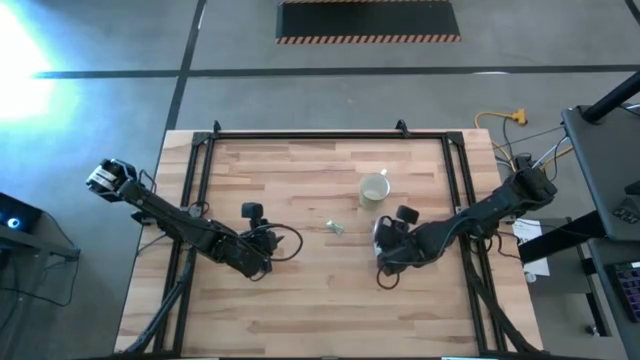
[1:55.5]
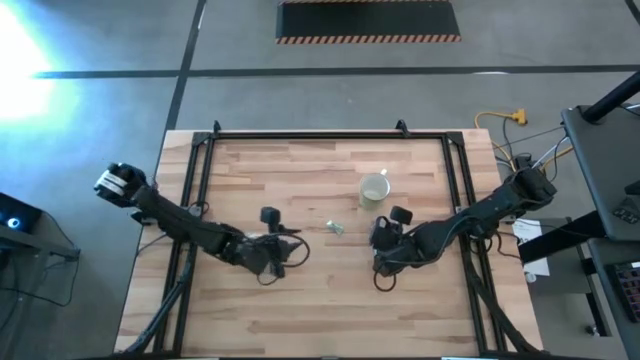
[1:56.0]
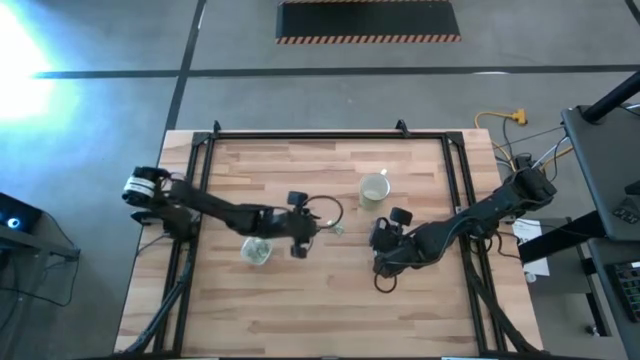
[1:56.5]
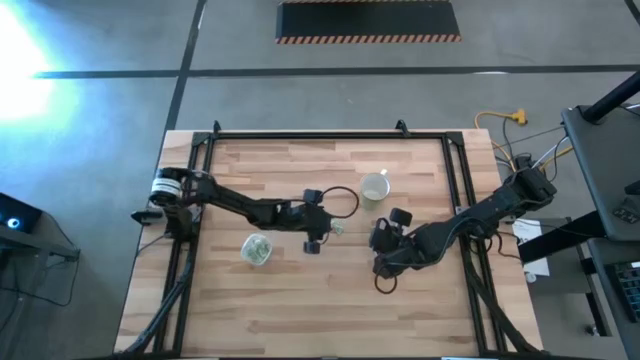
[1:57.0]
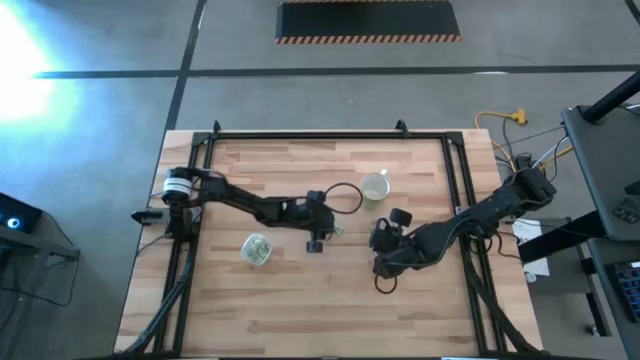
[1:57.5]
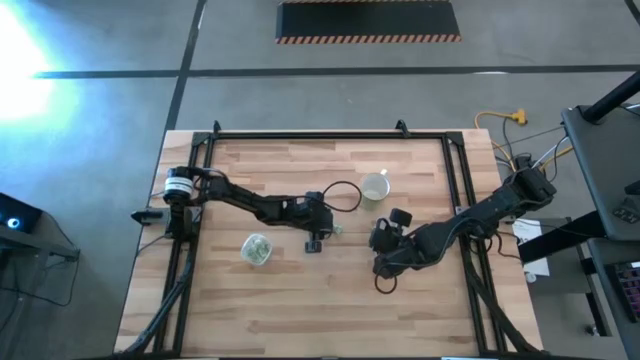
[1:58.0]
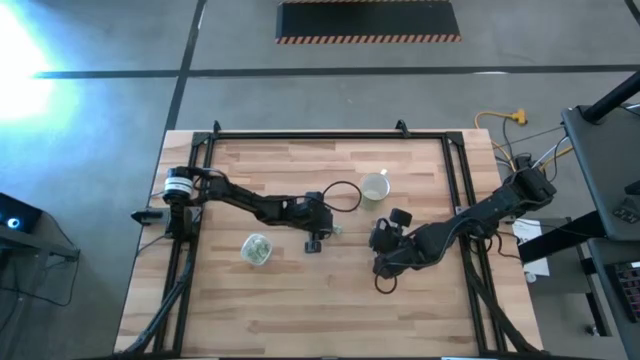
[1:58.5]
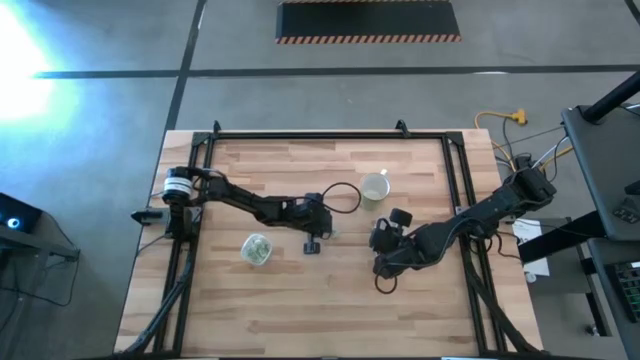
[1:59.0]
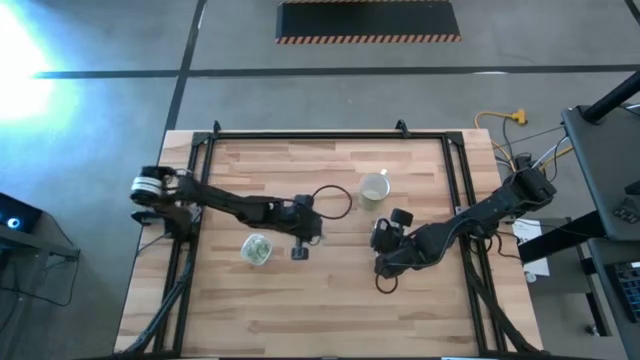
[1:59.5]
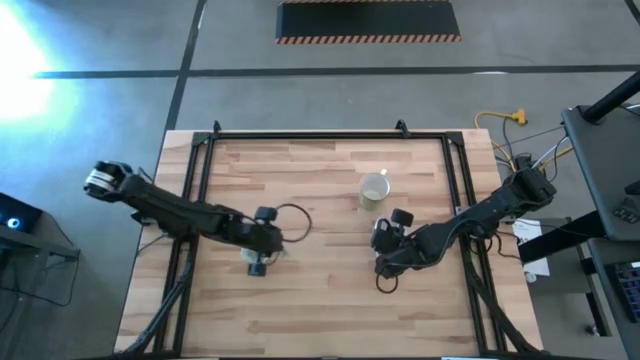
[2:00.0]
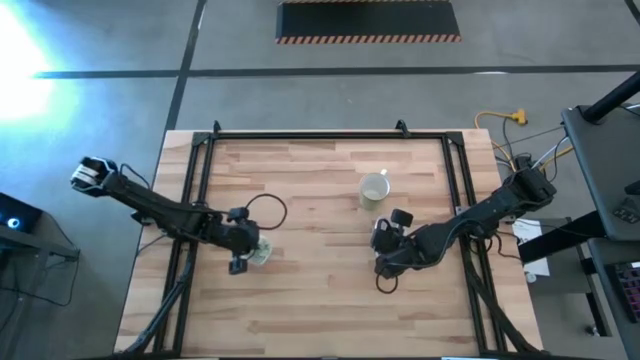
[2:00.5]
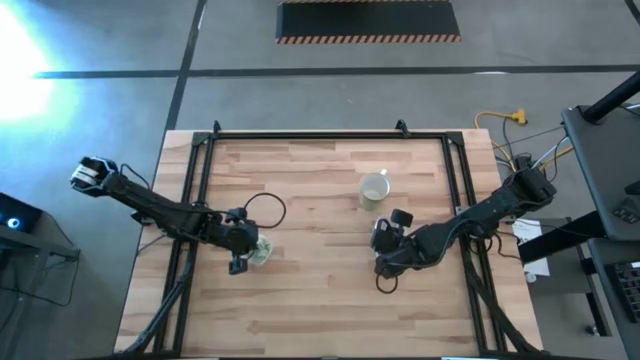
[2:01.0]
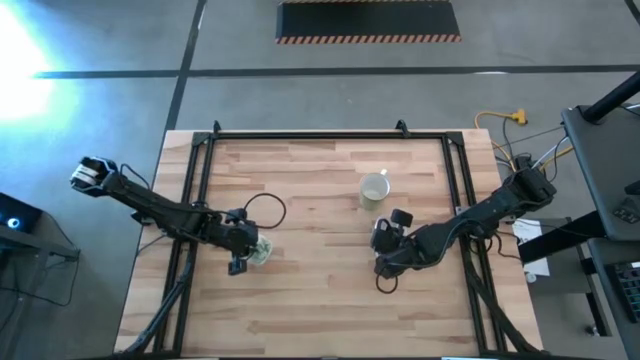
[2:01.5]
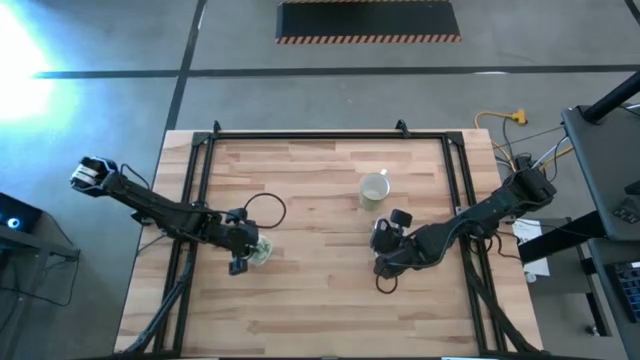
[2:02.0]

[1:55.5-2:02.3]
Task: Pick and place Stevia / Truvia into bins
Put the stevia packet into the left transparent container

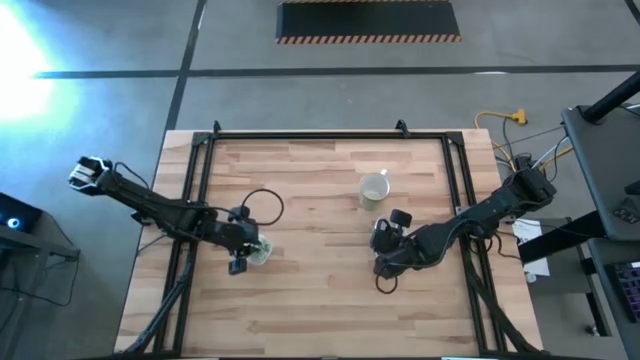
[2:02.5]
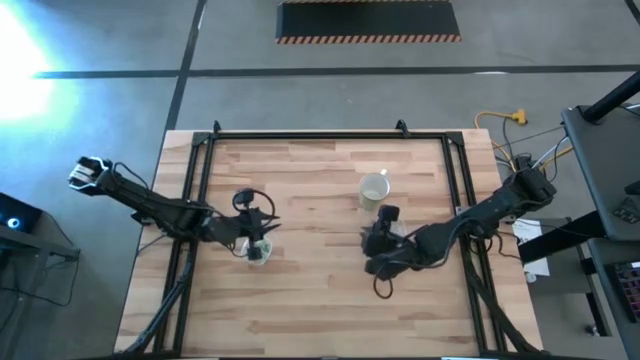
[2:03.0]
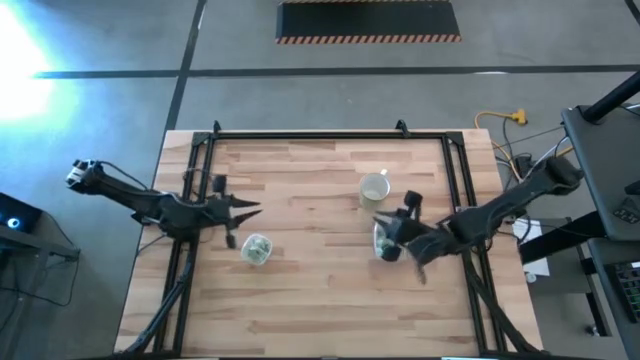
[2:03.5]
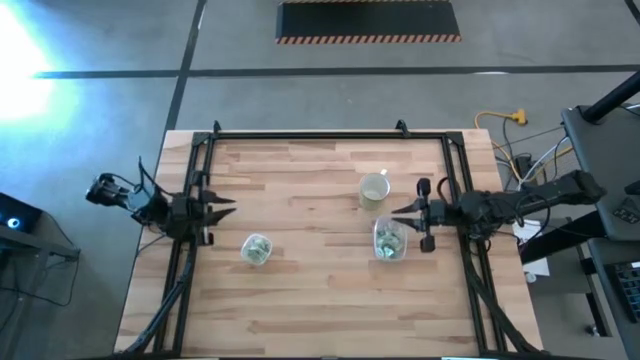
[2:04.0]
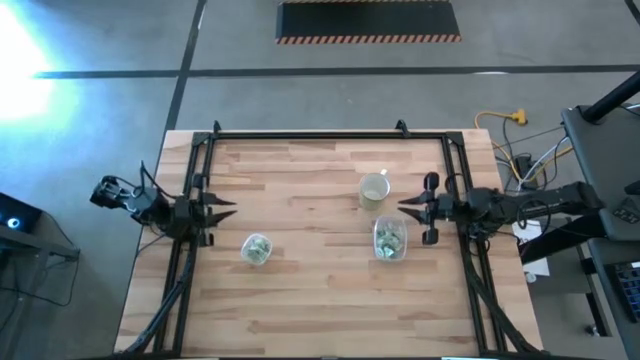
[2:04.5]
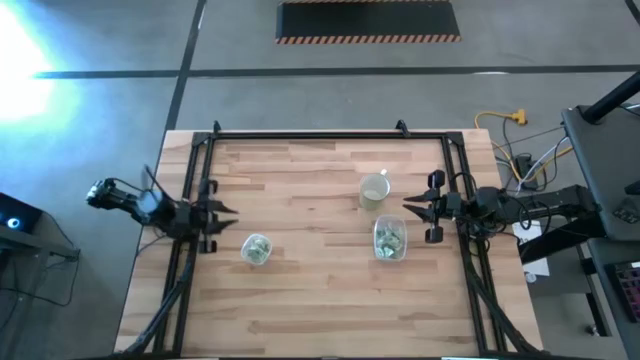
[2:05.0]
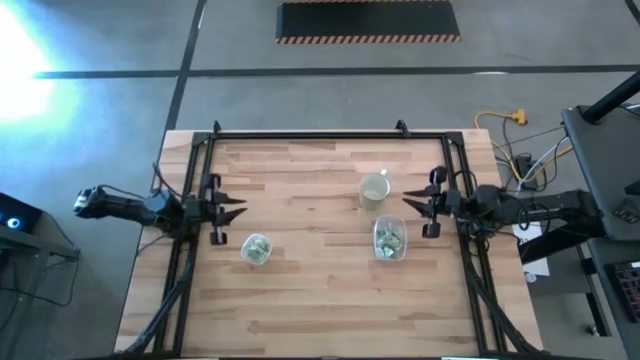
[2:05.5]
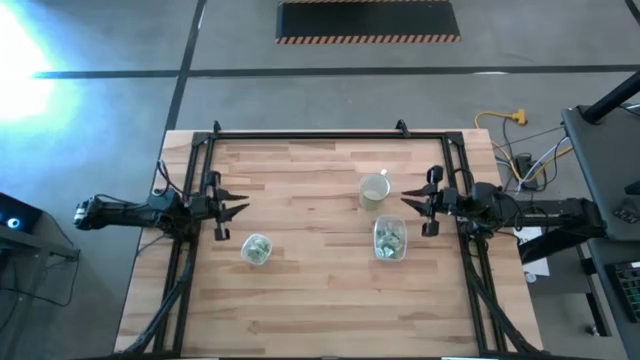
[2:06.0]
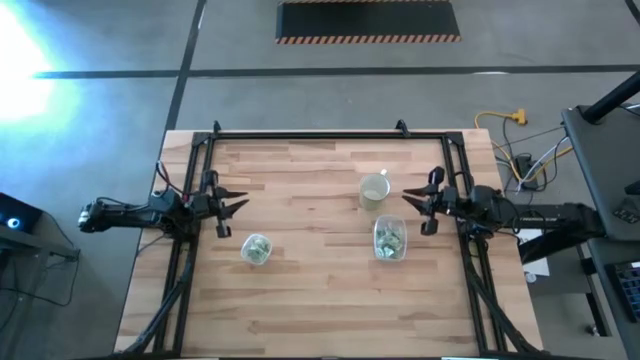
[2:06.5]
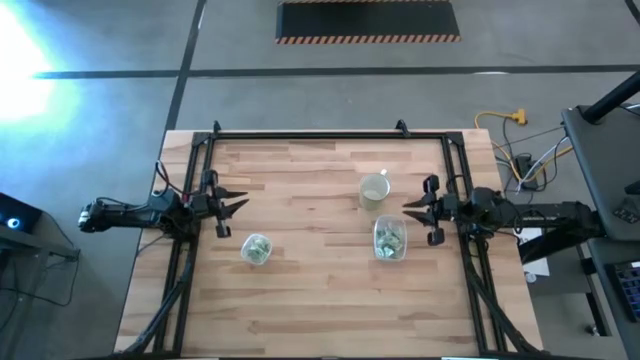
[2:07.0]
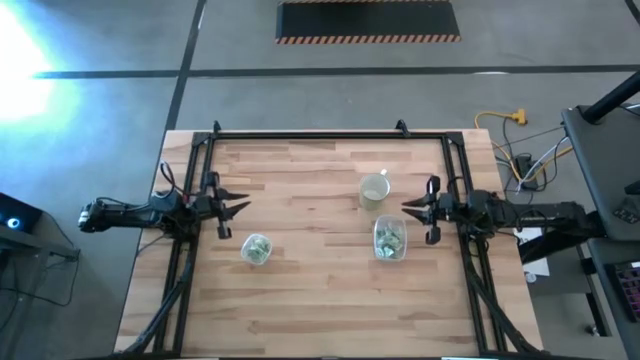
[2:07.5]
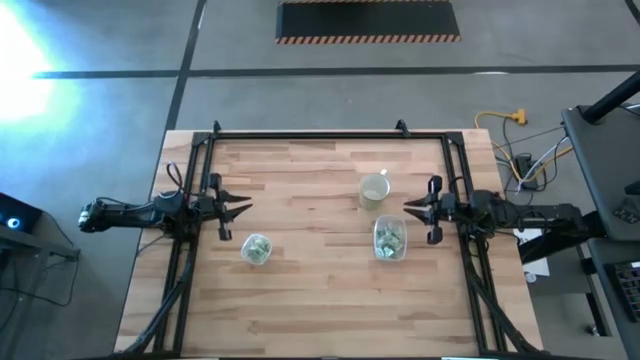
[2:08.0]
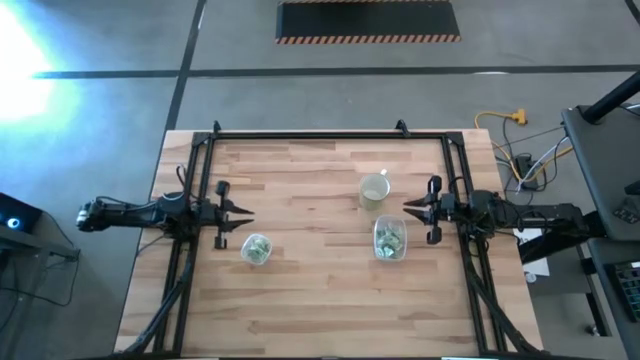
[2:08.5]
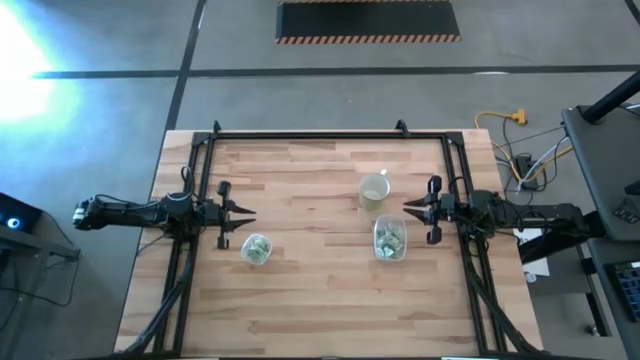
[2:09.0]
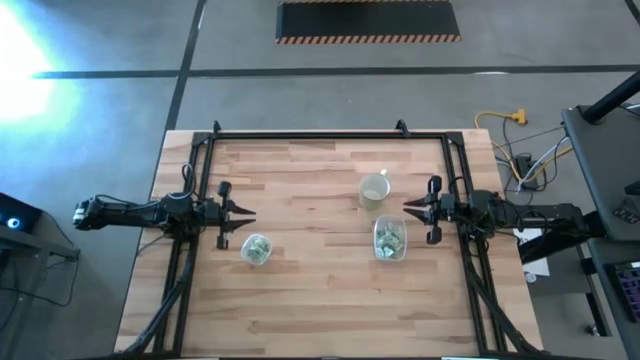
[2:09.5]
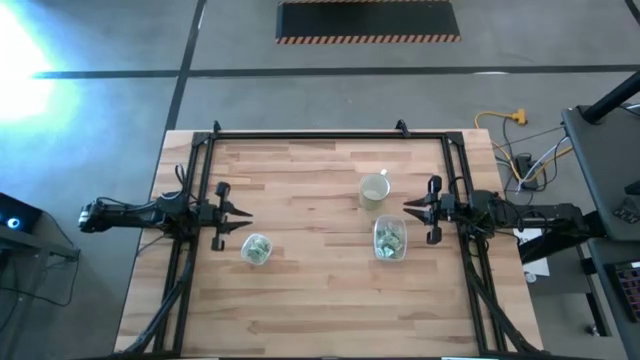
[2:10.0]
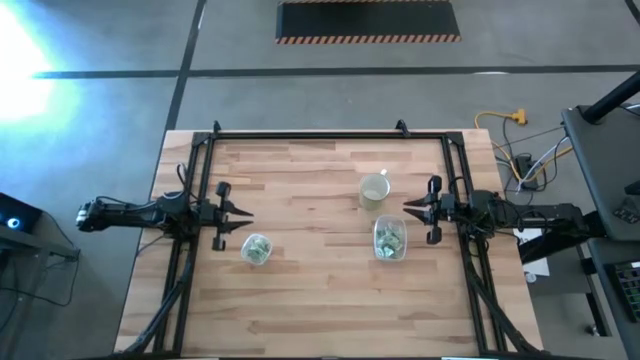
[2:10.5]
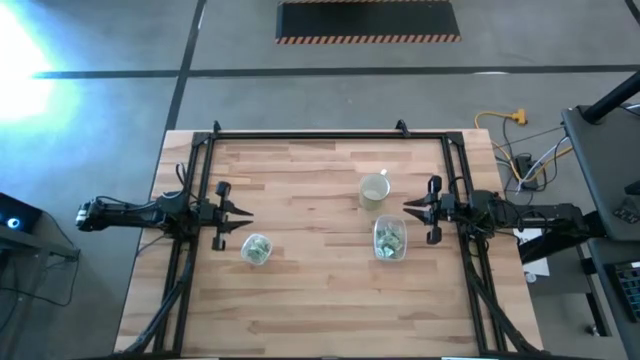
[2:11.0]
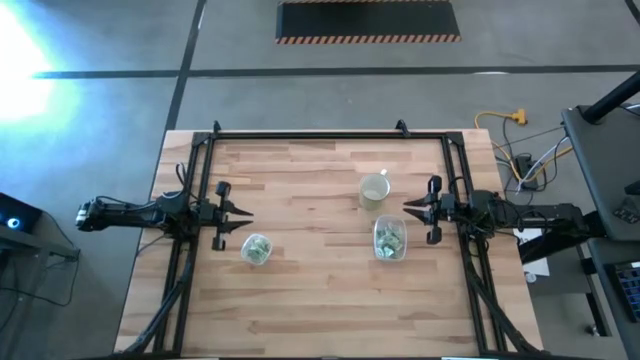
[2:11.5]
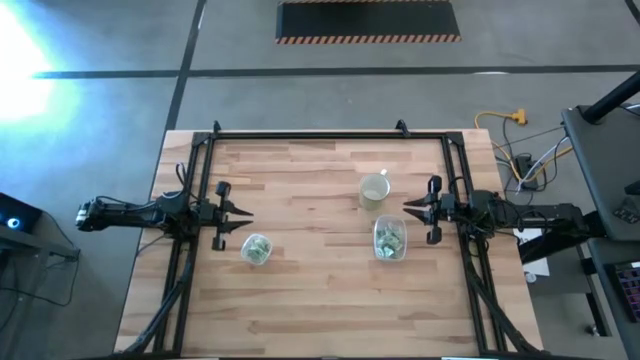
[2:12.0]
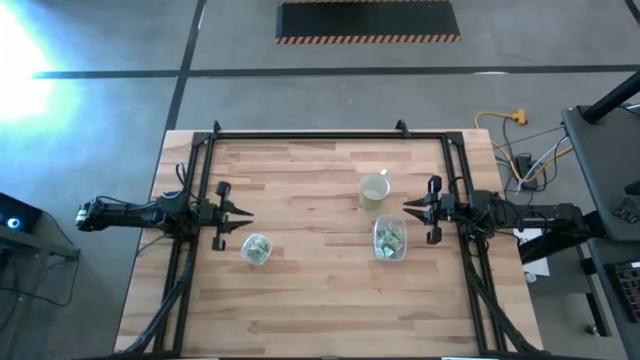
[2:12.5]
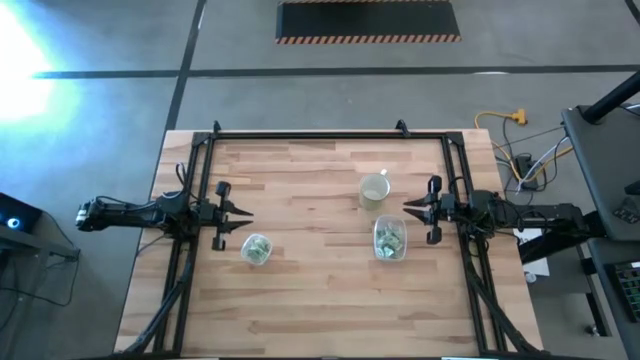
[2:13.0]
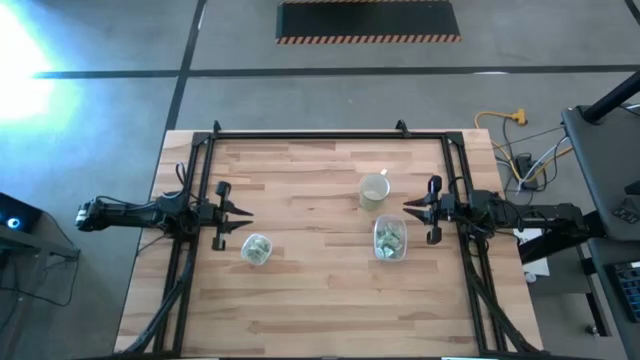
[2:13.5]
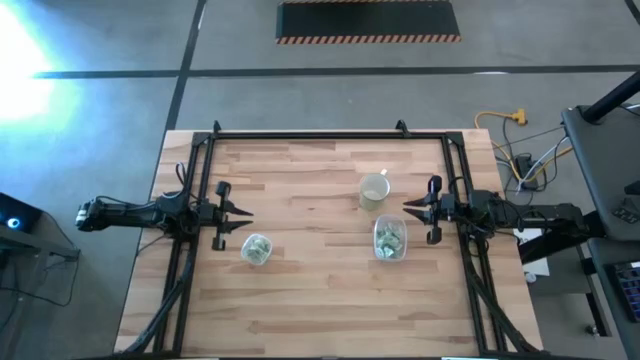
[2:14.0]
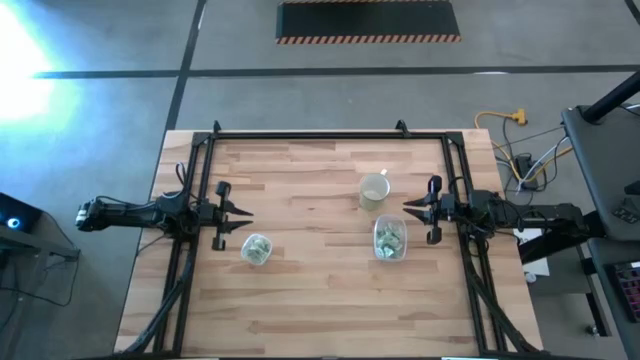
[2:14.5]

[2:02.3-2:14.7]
Return to Home Position

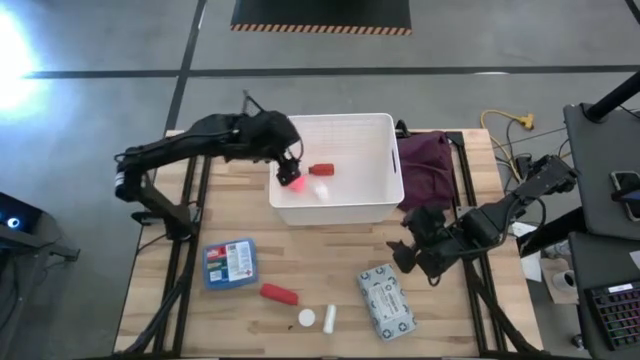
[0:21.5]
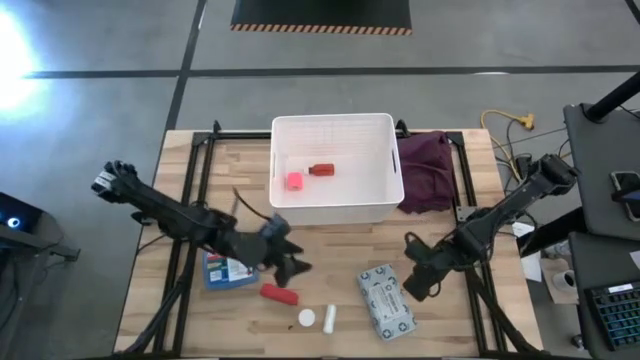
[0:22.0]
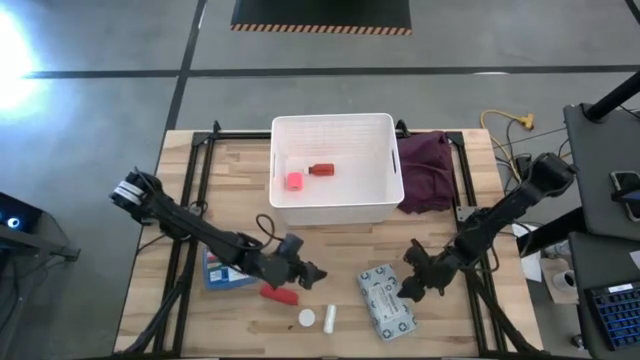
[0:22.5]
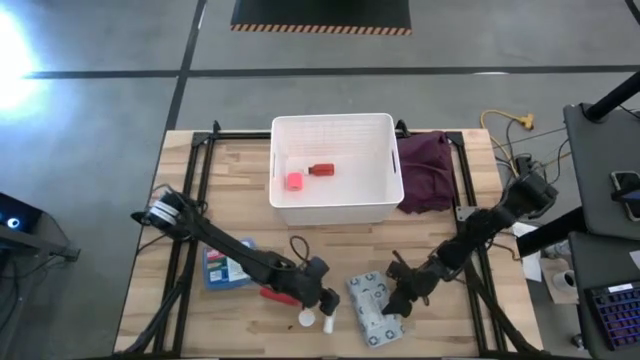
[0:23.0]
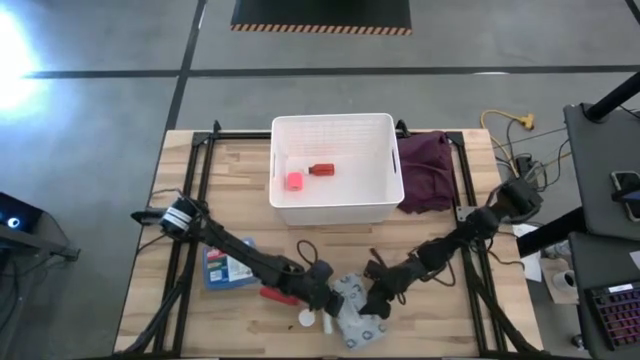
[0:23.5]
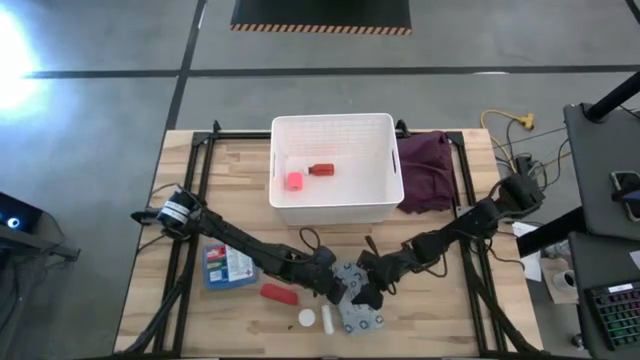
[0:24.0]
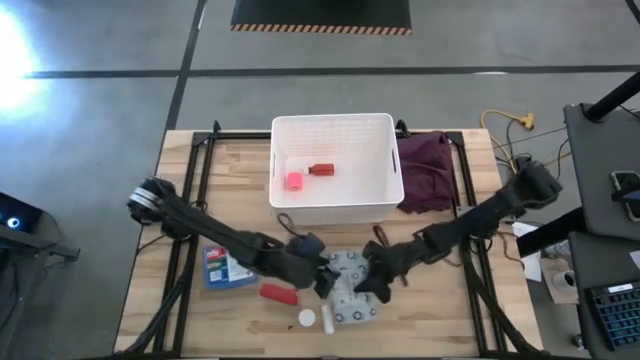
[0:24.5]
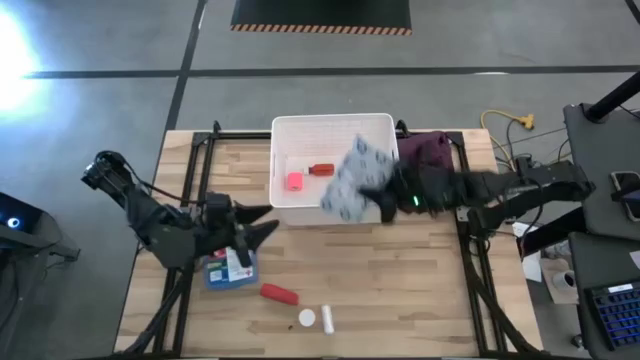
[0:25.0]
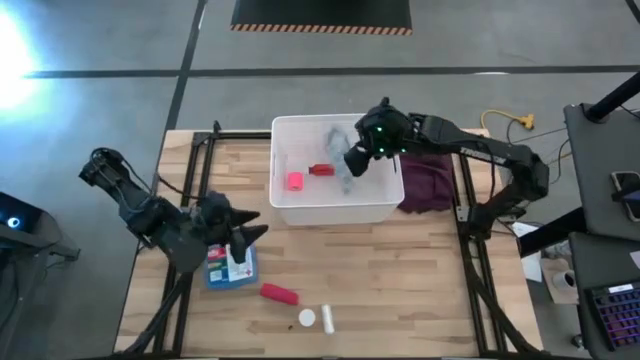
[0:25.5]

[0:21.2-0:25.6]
Task: Pick & place medical supplies in basket/bin
Put the light blue mailer bag into the white bin
